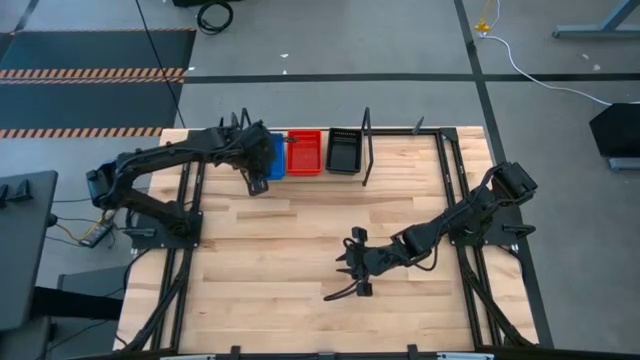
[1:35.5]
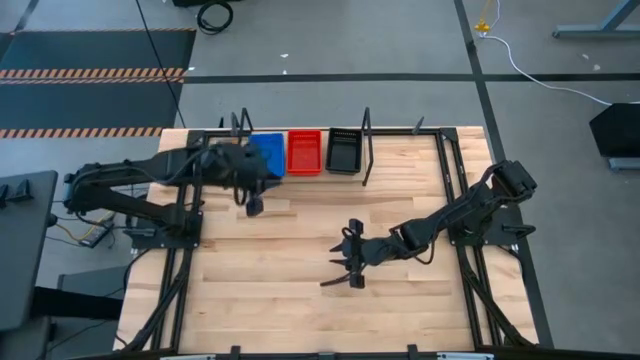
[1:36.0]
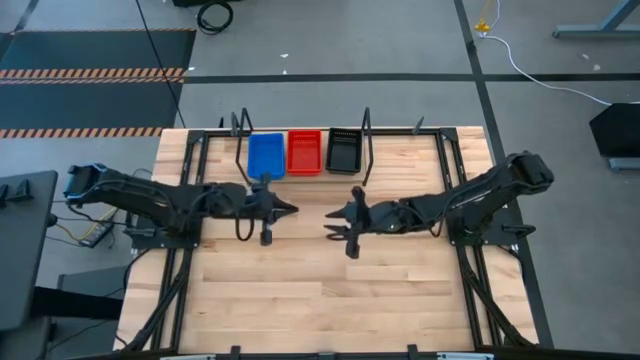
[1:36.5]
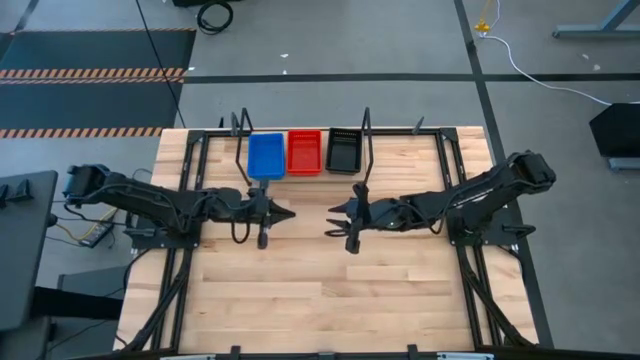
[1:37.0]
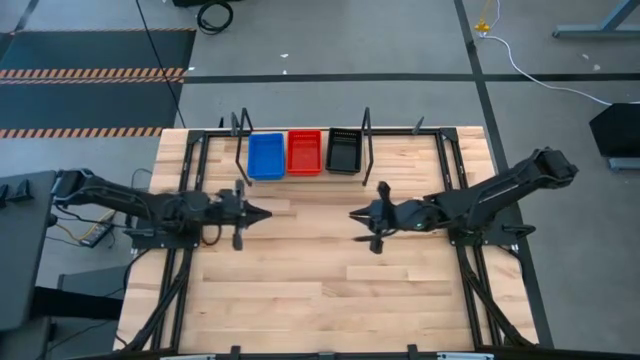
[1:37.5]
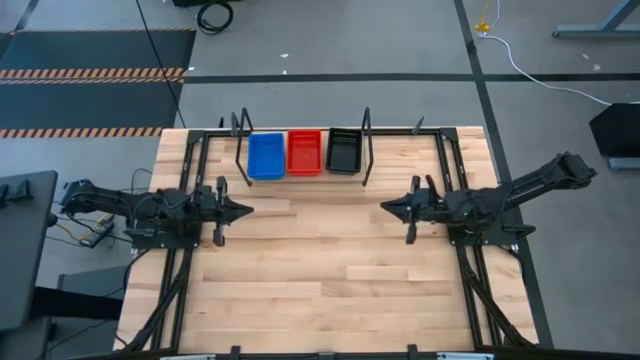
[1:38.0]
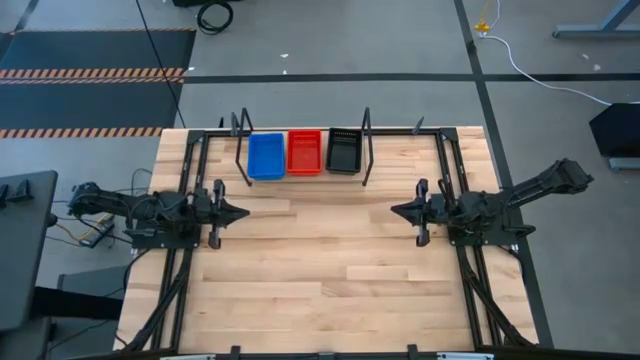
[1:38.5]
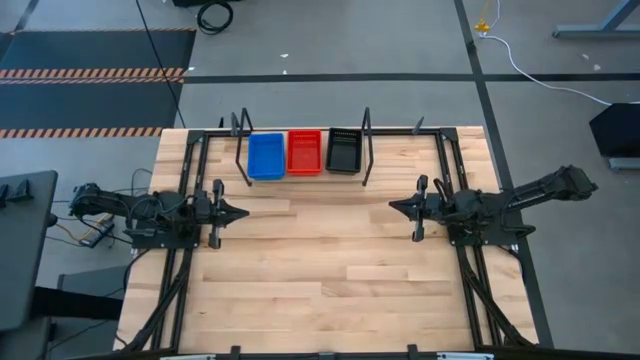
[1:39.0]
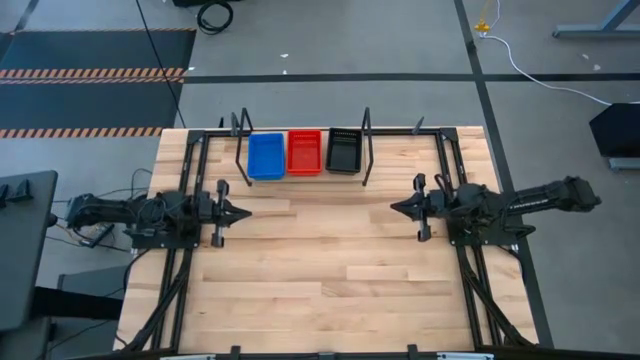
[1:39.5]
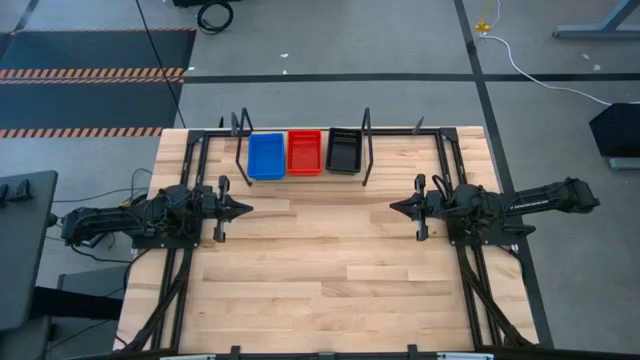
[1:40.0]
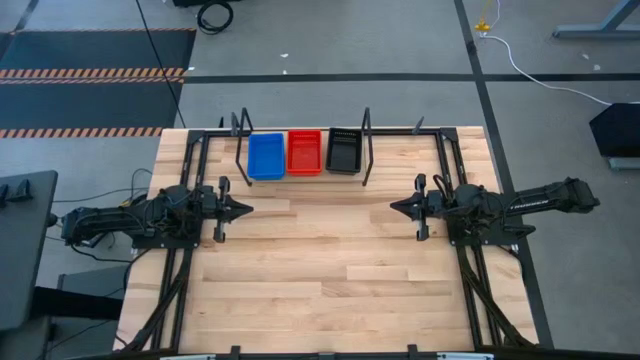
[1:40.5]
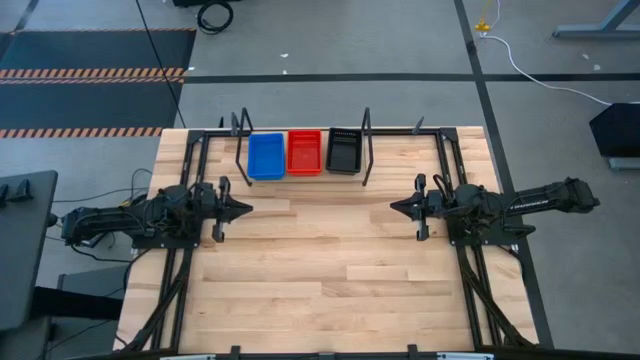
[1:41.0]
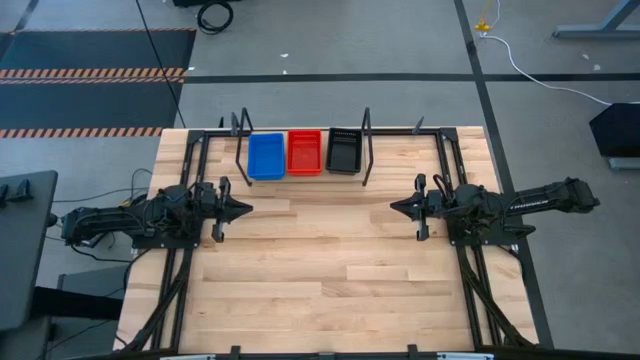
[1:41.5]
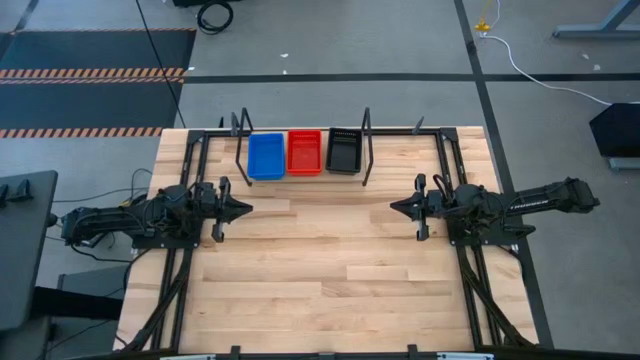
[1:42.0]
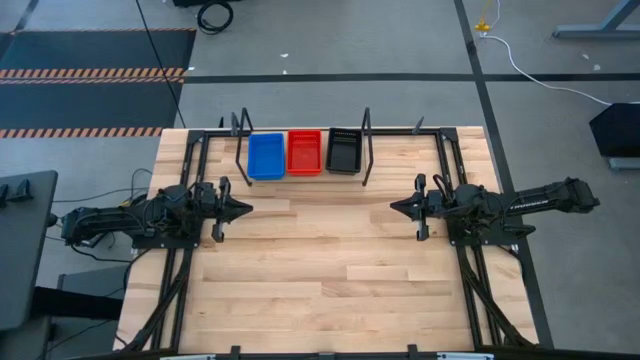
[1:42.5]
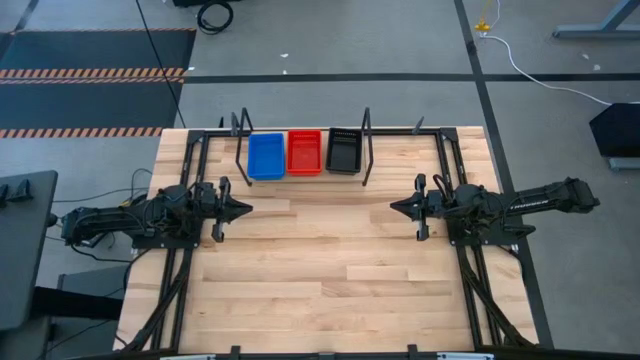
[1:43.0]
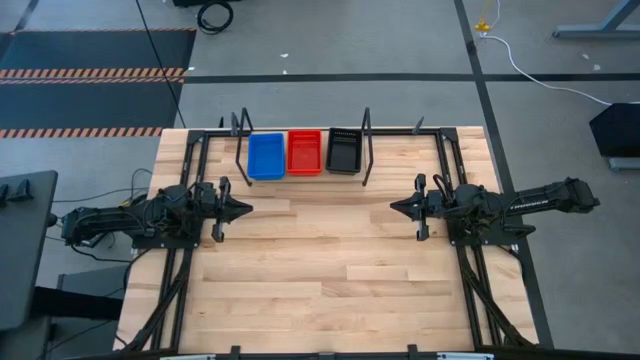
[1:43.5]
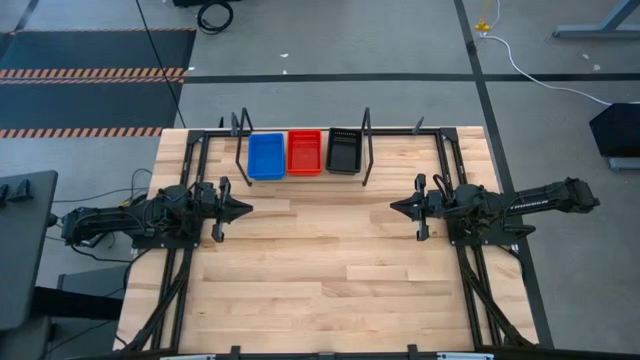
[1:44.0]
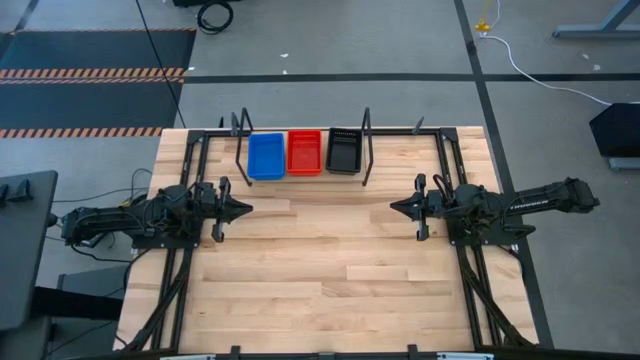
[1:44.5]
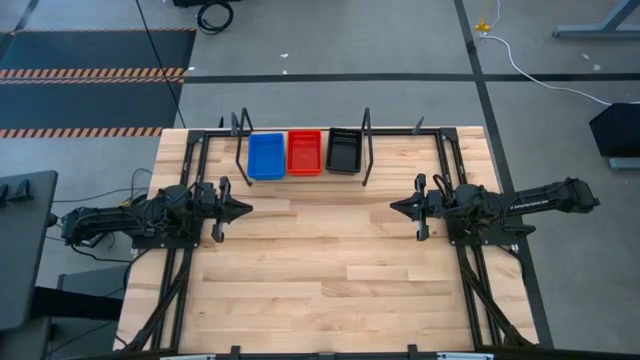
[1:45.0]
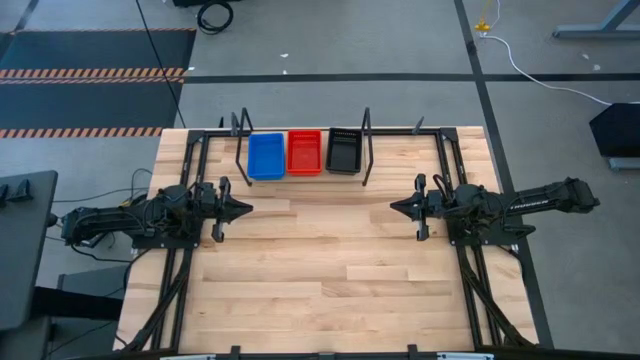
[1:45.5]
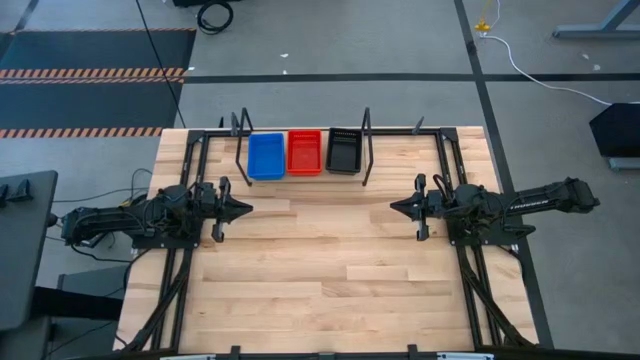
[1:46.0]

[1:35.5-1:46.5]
Task: Stack baskets on shelf by color
Return to Home Position

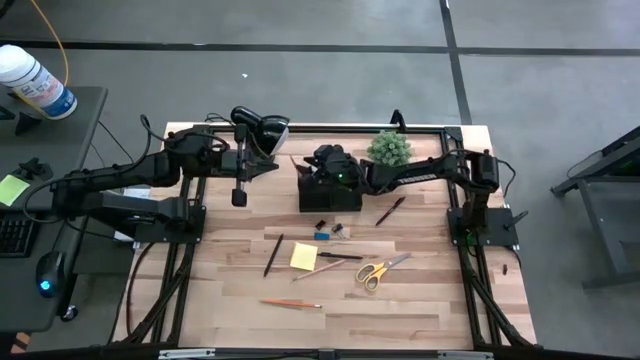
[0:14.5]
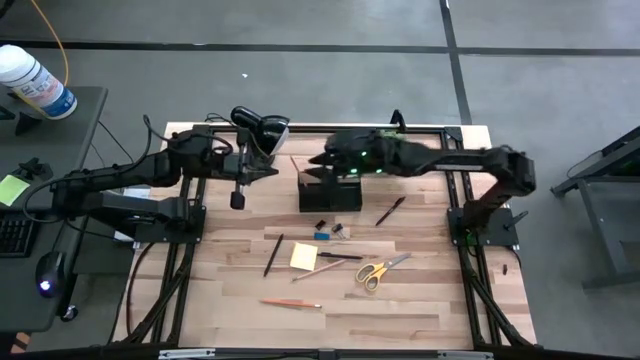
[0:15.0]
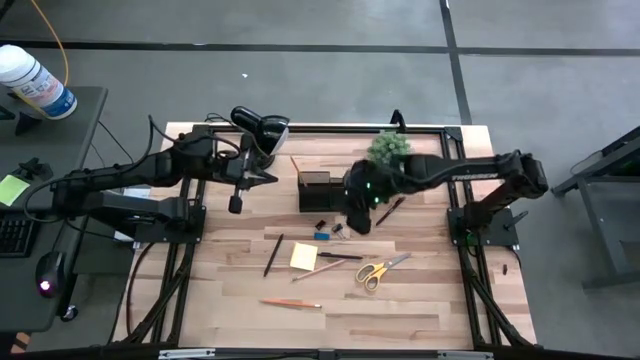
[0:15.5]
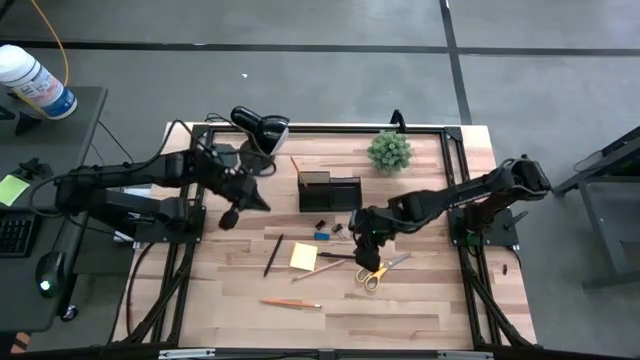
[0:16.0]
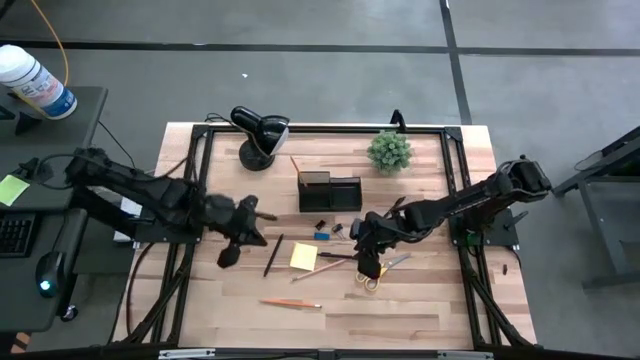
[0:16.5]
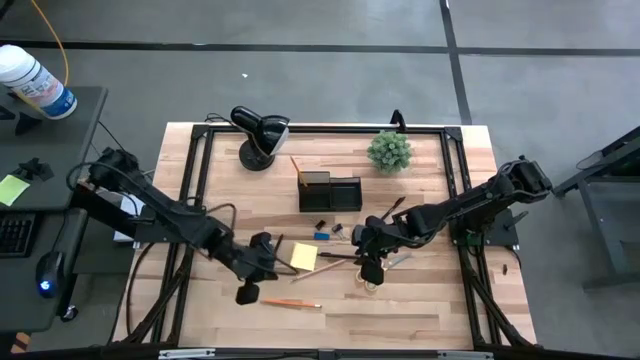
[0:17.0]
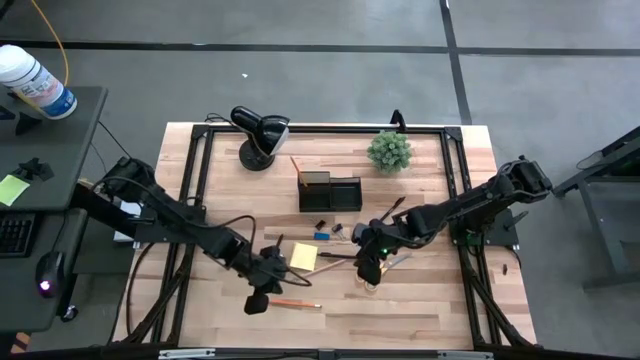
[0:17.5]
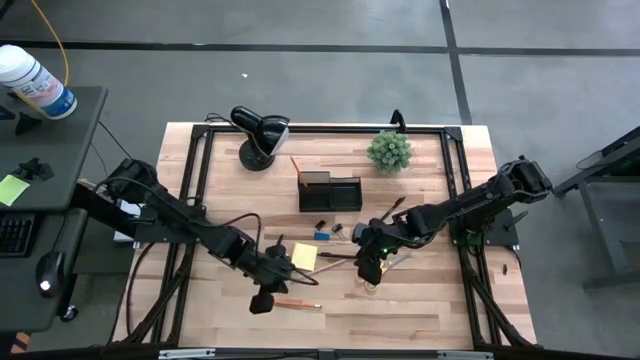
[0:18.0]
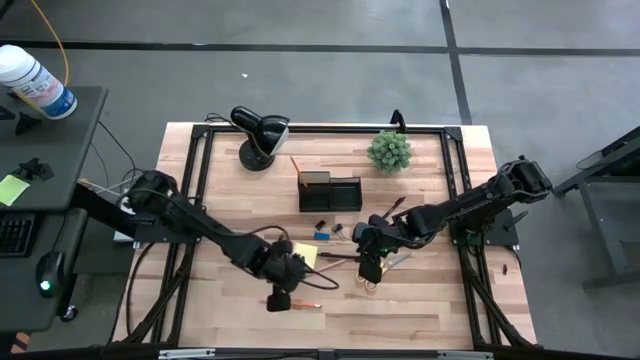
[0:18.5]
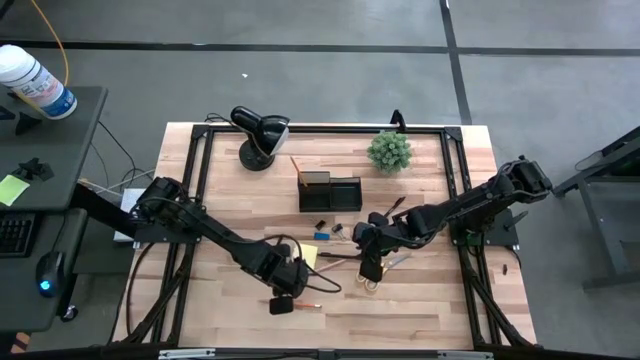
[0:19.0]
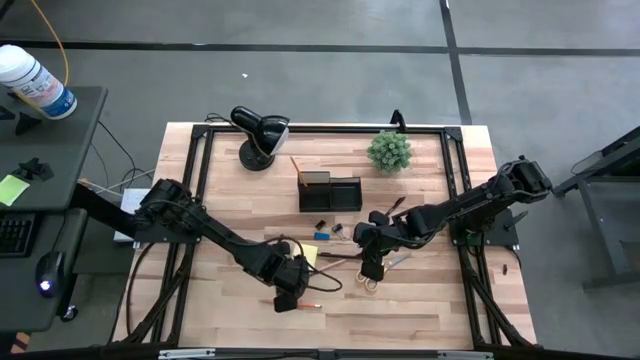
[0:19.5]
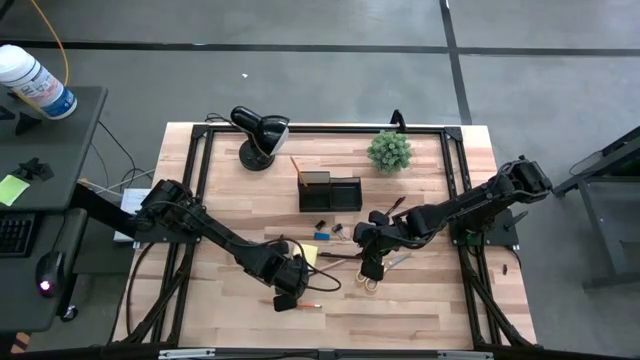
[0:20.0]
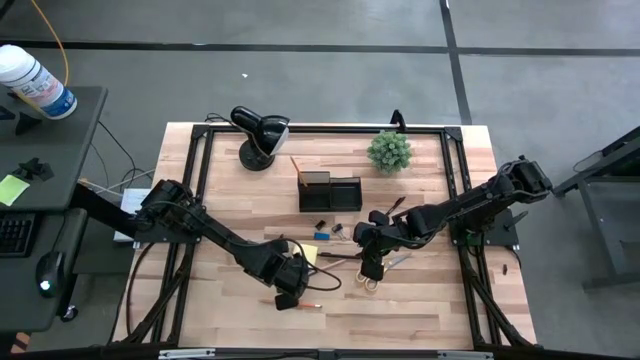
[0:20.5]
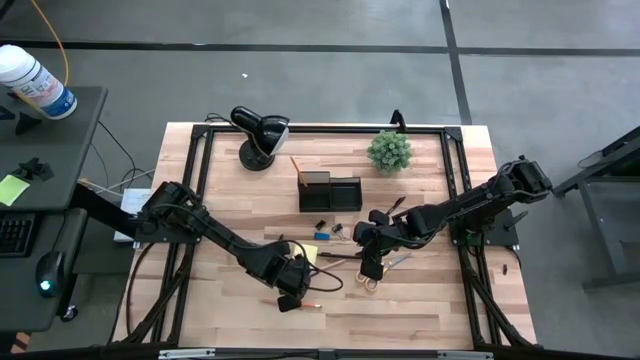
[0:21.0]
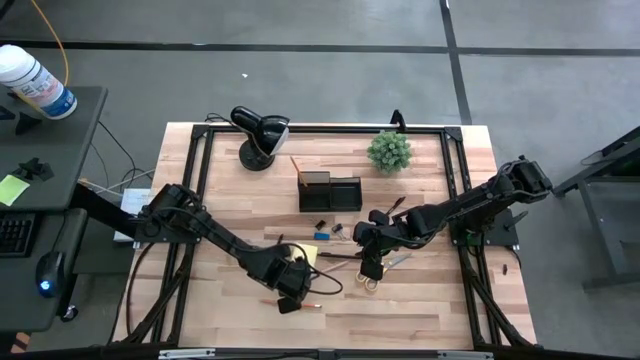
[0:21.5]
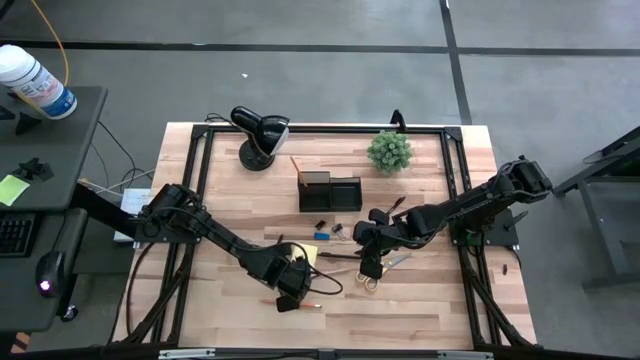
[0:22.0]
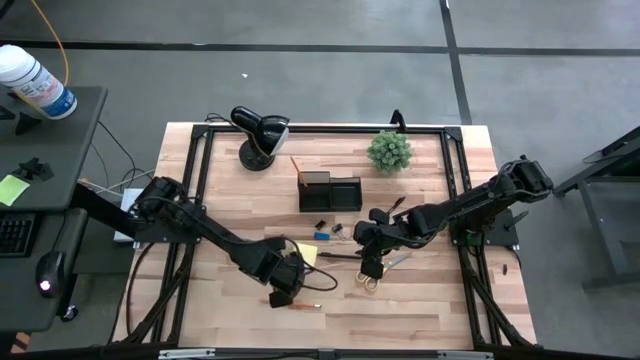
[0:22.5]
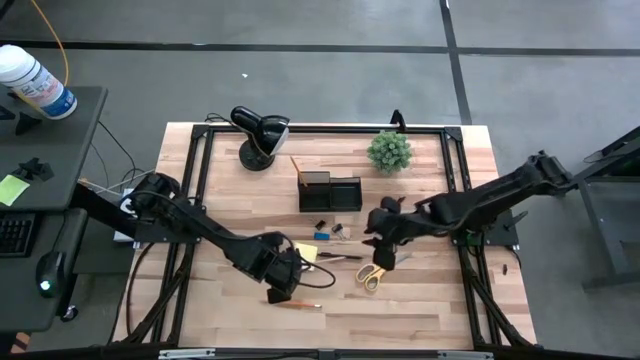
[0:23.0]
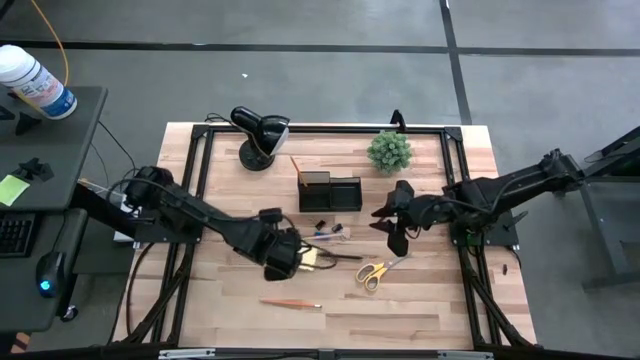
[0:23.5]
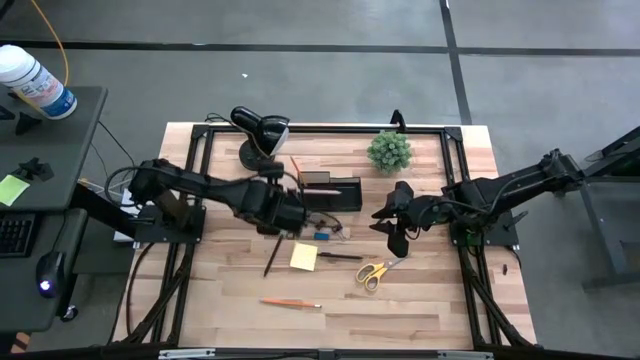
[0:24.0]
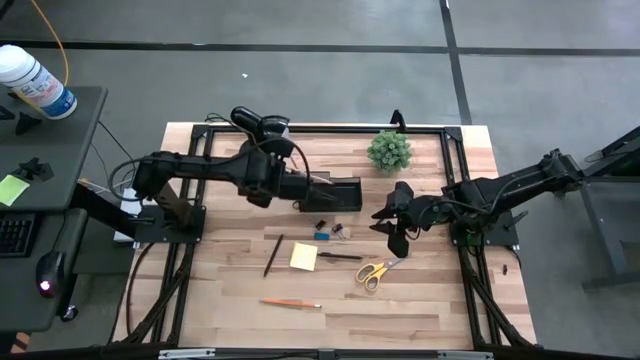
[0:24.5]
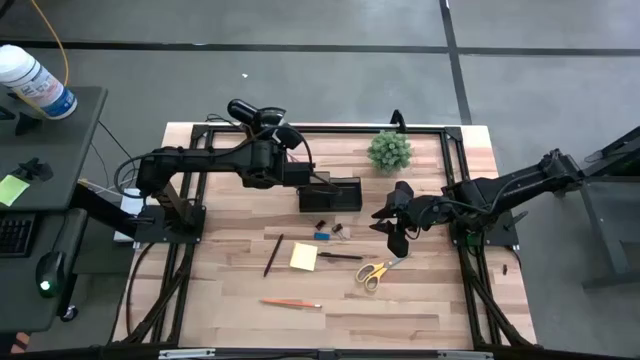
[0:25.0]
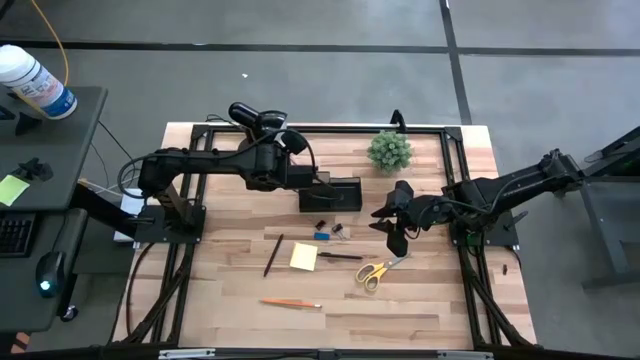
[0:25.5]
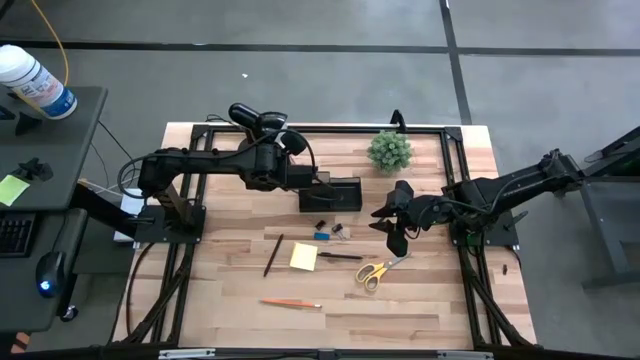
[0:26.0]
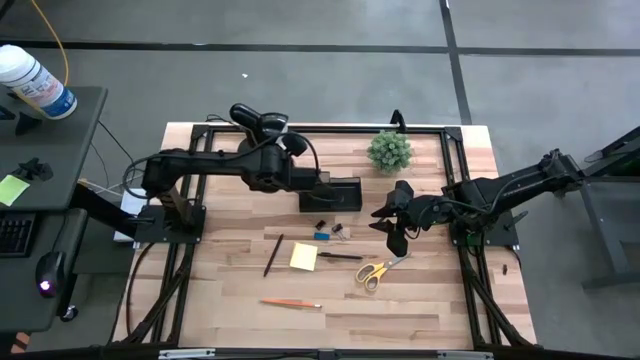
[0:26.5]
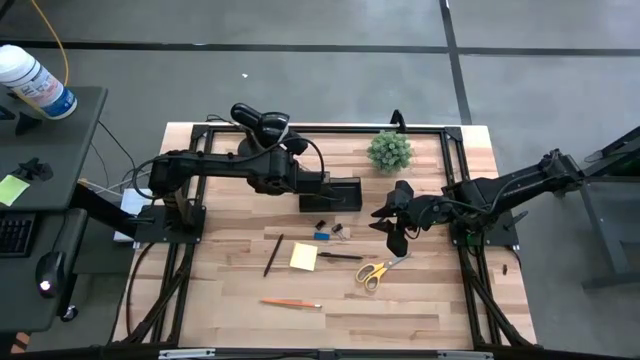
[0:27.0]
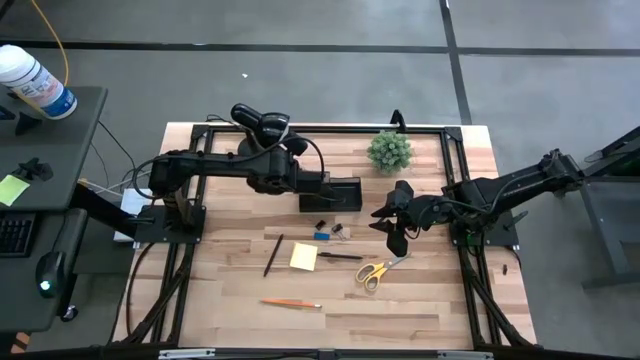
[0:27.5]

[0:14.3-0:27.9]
Task: Pick and place office supplies into organizer
Put the pink pencil into the black desk organizer
